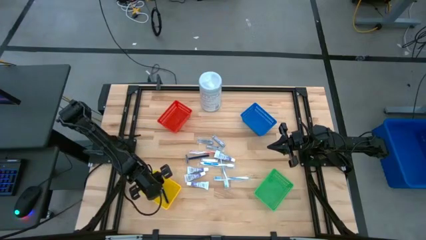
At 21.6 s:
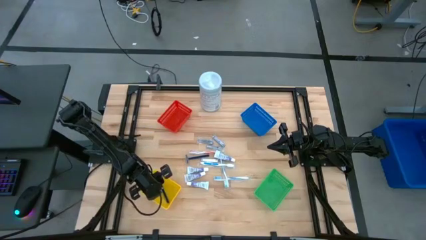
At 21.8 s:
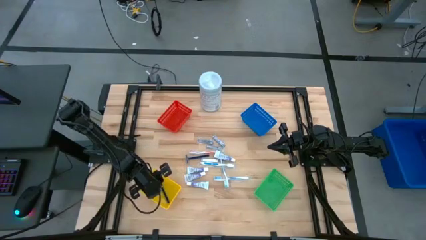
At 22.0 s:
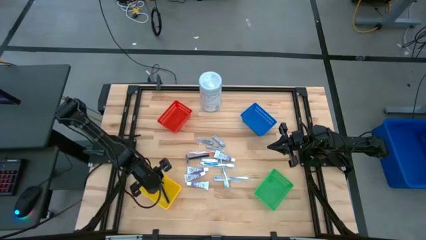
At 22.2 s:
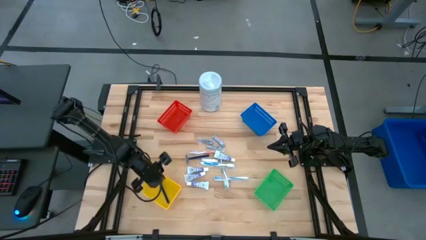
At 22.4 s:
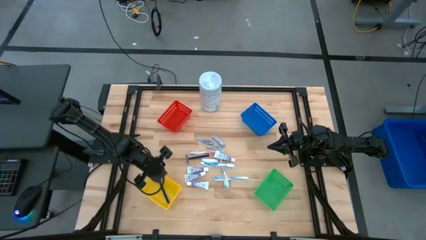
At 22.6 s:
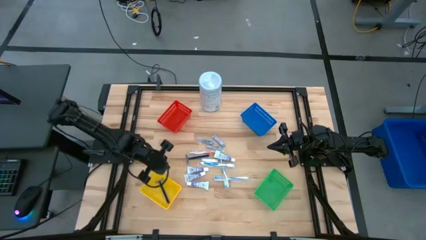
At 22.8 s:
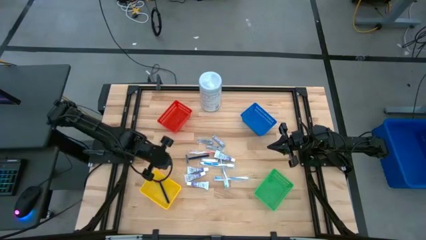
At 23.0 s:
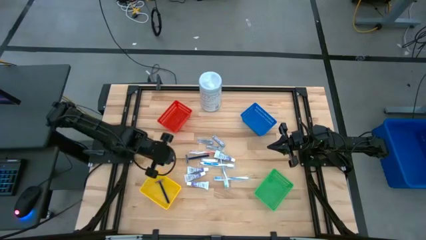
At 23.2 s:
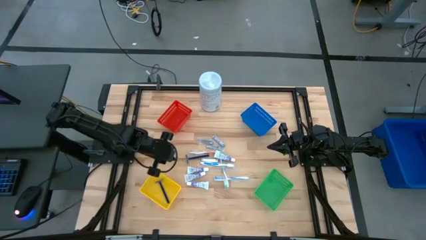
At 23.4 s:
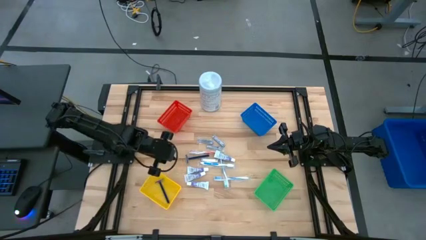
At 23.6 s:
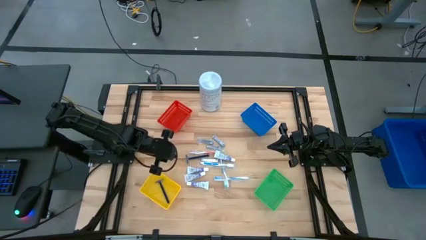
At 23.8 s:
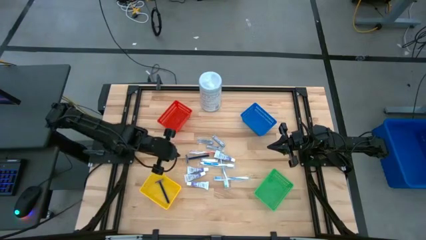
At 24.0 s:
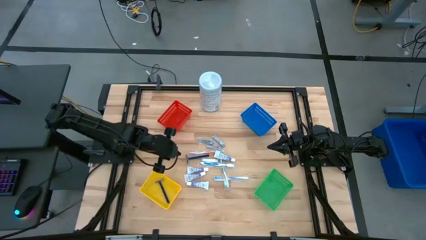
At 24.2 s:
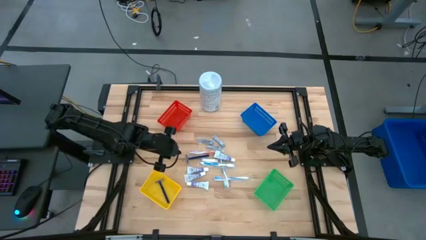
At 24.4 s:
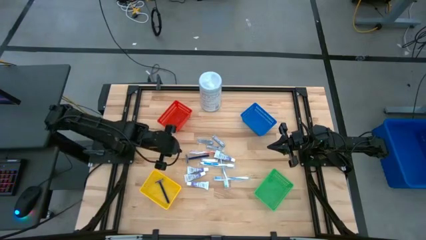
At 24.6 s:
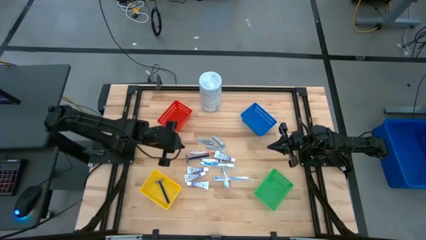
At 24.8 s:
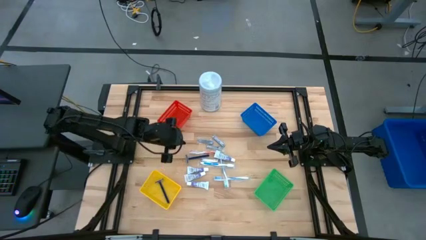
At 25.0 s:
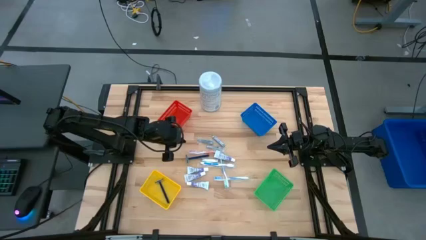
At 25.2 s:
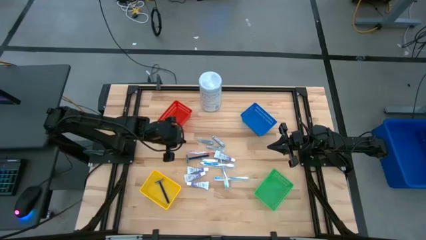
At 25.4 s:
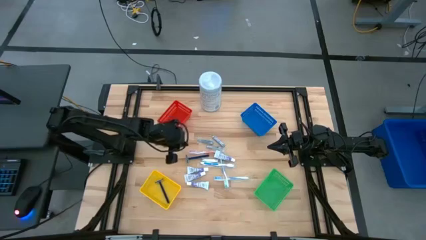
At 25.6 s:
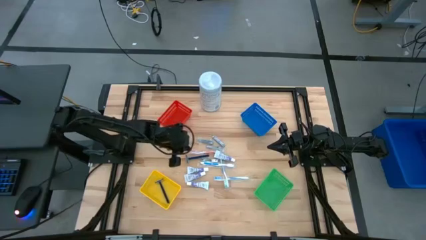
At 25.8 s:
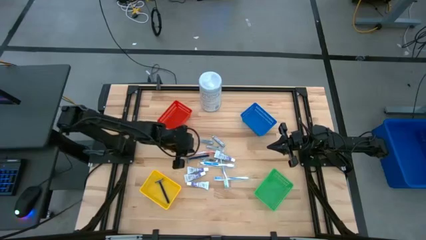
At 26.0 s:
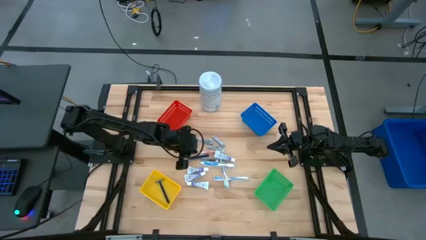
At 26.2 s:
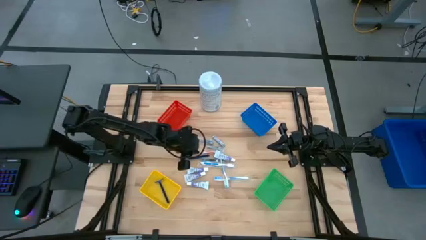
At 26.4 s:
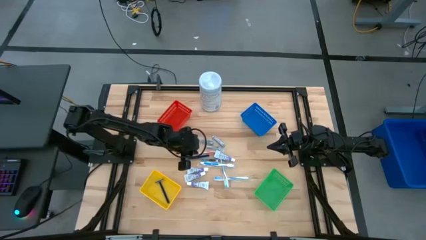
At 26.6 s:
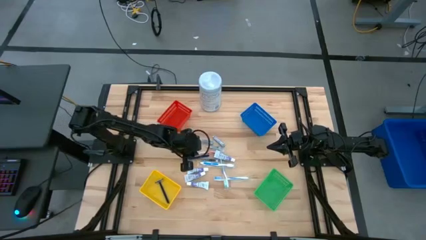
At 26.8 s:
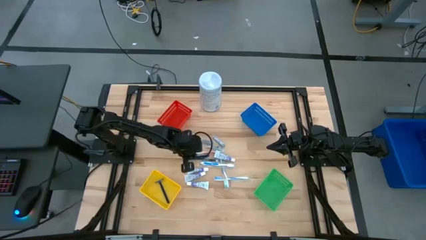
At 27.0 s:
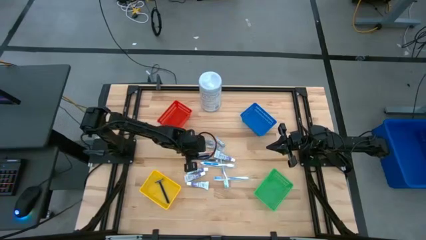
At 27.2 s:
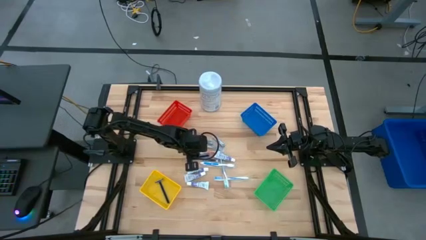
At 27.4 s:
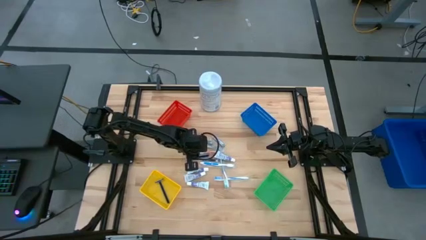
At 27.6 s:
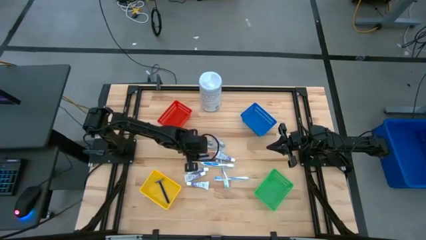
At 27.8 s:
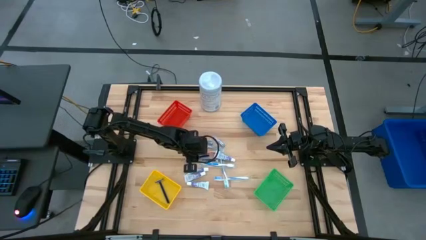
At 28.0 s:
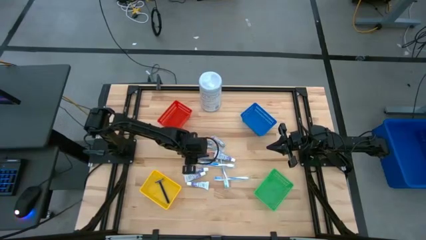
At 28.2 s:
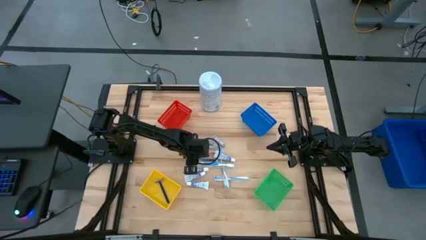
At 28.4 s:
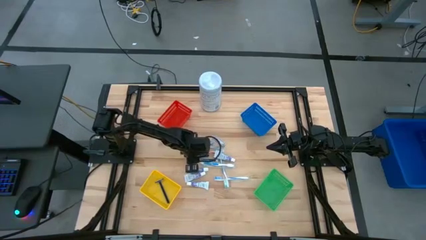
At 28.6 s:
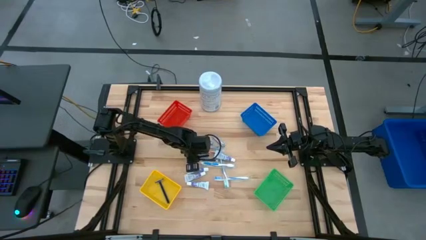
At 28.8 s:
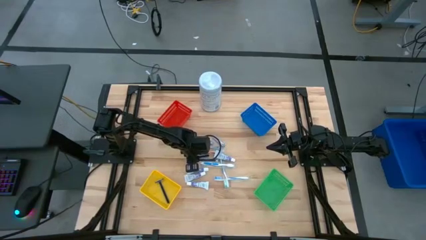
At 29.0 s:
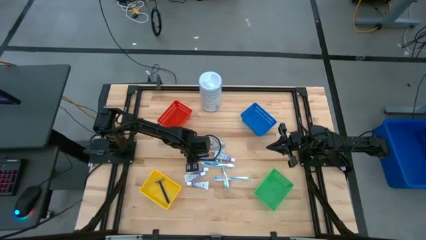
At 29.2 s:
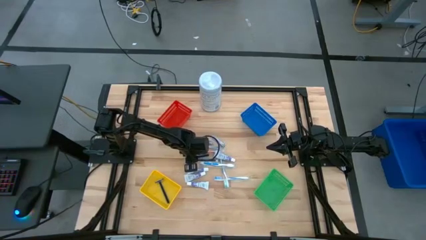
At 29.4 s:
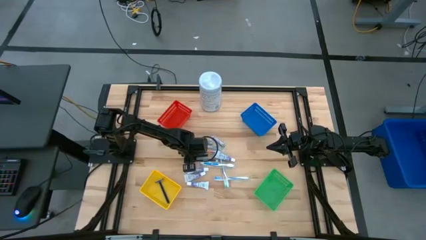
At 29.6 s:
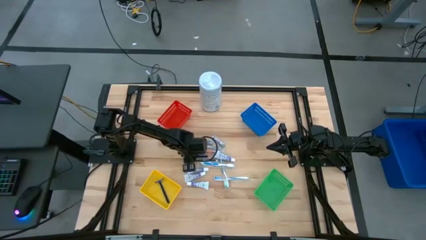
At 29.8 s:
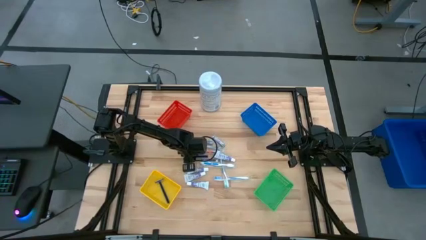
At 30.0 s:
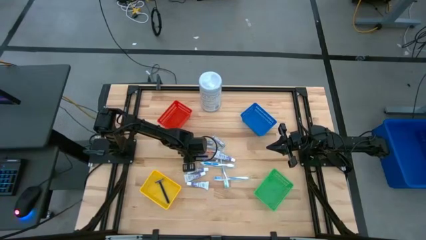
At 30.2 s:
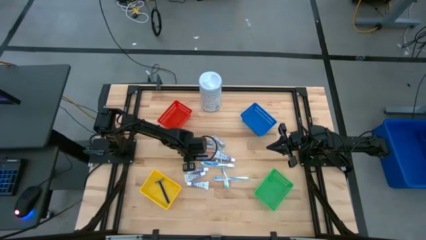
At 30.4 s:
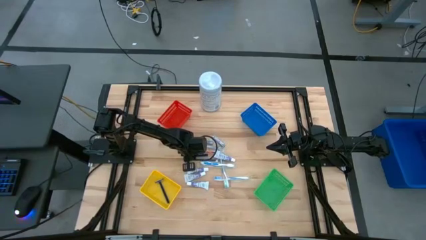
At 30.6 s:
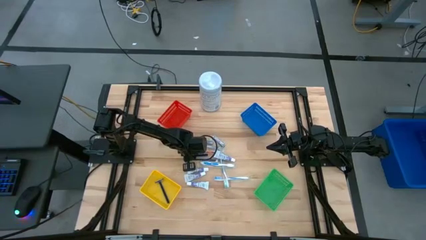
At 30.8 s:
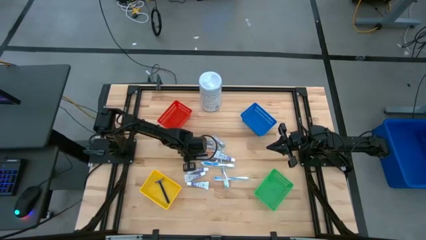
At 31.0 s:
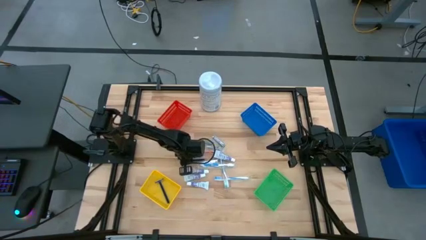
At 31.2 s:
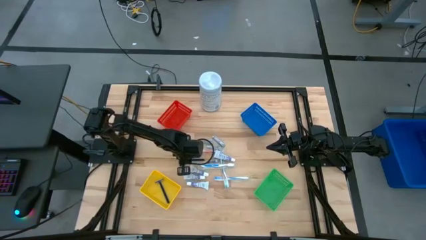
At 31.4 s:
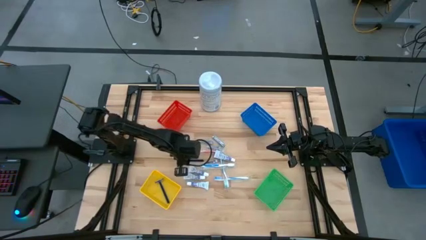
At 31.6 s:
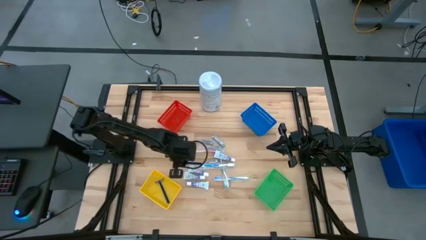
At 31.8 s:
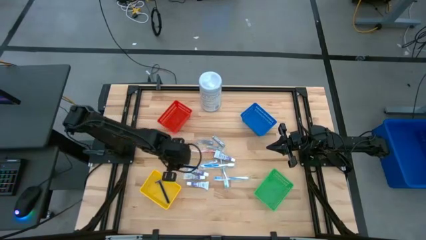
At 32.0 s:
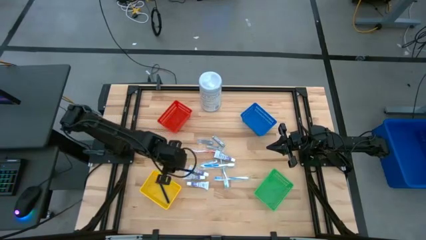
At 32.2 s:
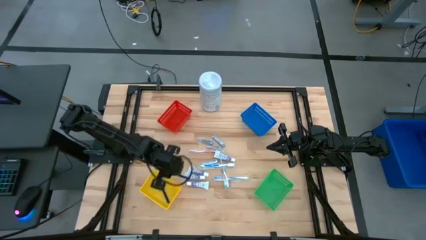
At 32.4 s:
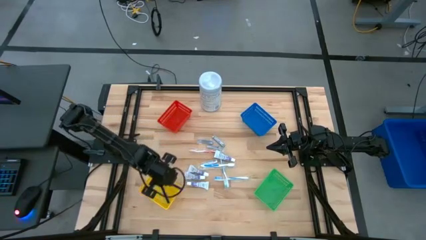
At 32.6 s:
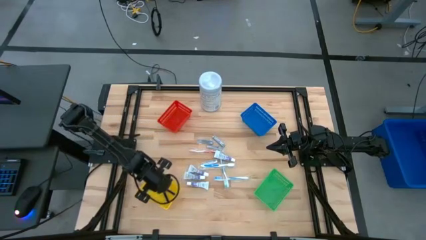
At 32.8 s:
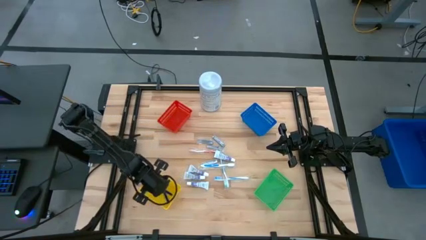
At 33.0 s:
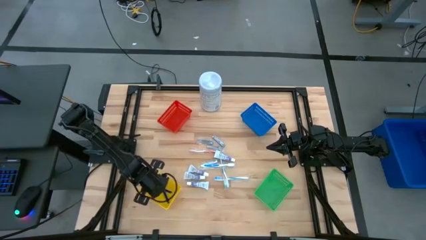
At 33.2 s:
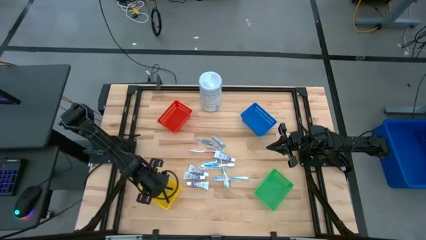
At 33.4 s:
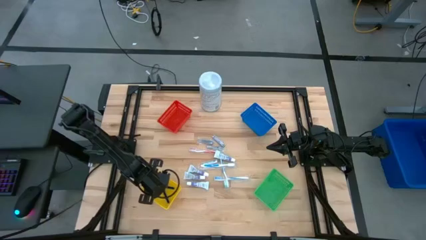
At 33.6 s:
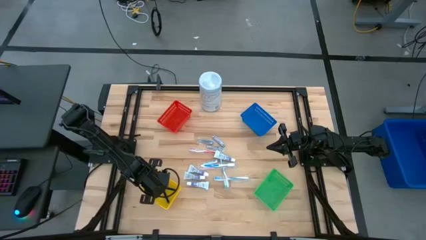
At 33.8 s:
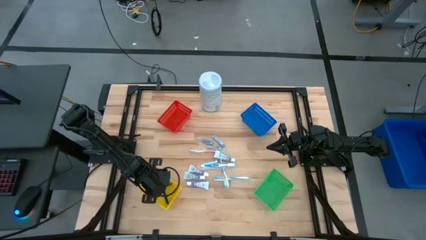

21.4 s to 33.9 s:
Task: Pick & Place Travel size toiletries
Put the blue razor blade into the yellow basket
